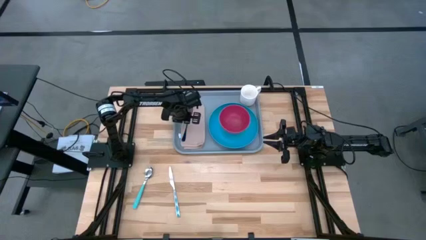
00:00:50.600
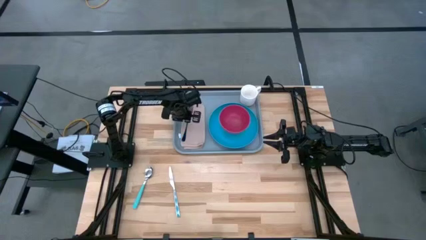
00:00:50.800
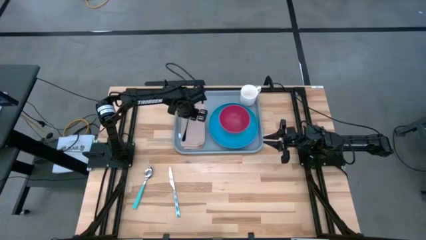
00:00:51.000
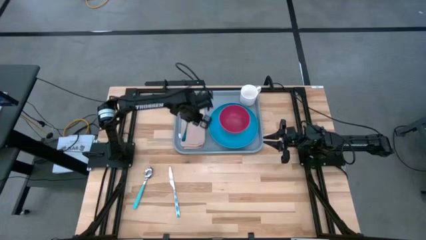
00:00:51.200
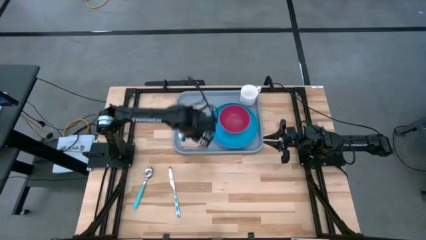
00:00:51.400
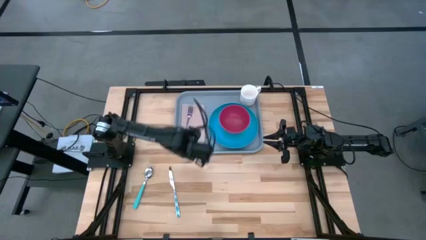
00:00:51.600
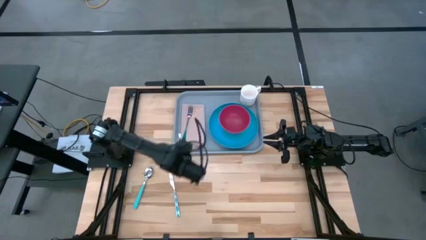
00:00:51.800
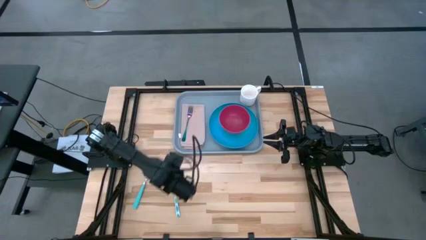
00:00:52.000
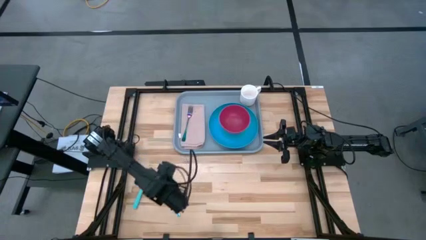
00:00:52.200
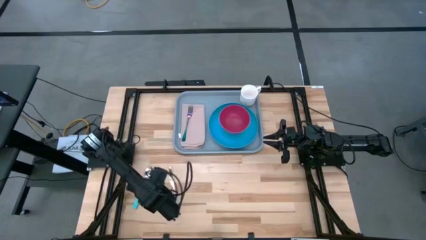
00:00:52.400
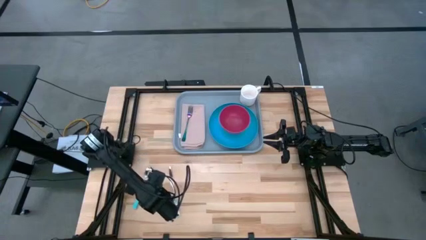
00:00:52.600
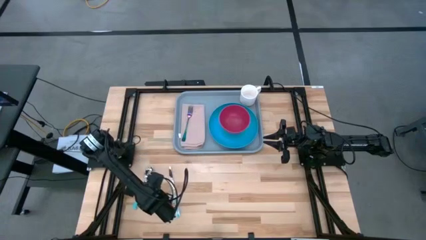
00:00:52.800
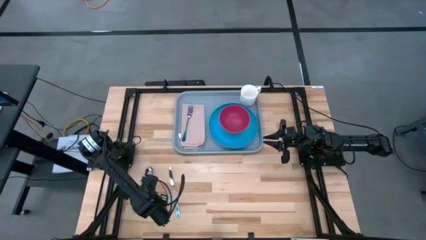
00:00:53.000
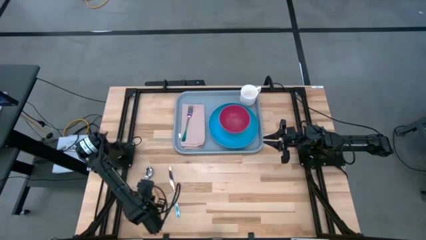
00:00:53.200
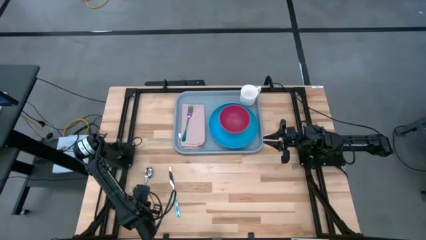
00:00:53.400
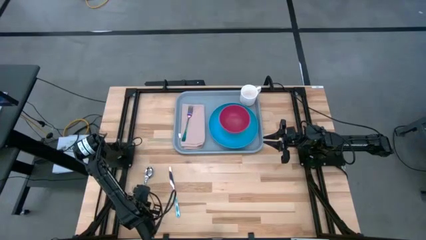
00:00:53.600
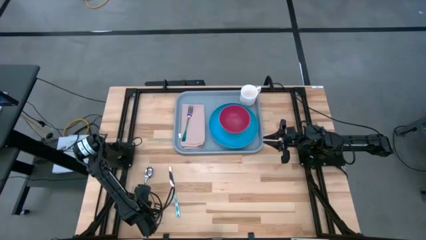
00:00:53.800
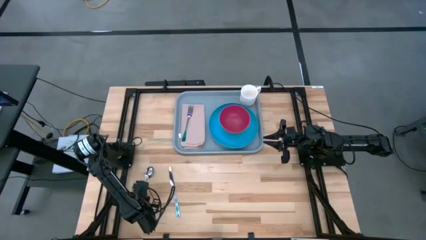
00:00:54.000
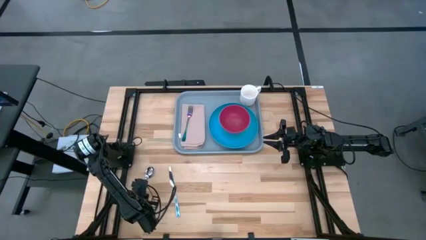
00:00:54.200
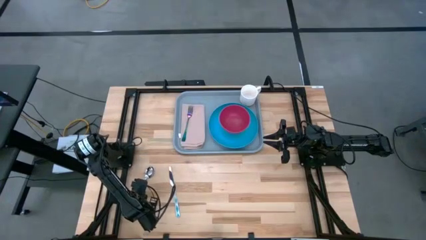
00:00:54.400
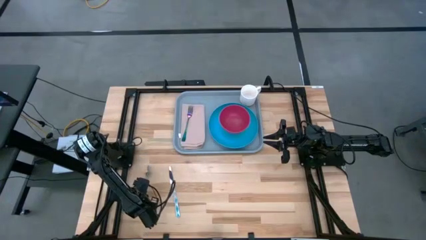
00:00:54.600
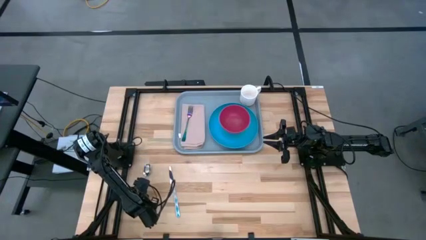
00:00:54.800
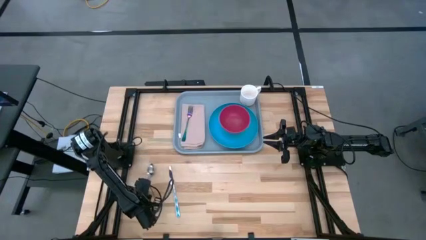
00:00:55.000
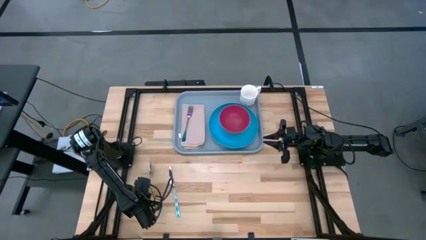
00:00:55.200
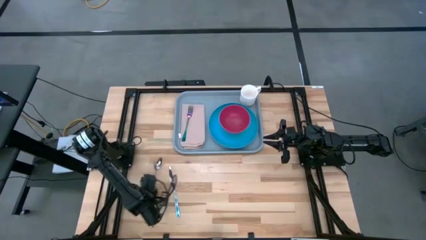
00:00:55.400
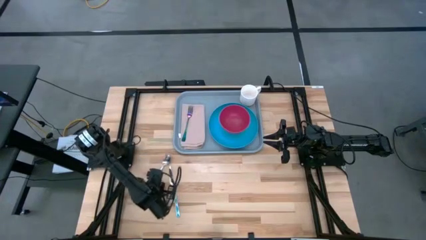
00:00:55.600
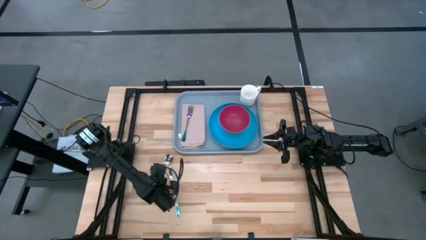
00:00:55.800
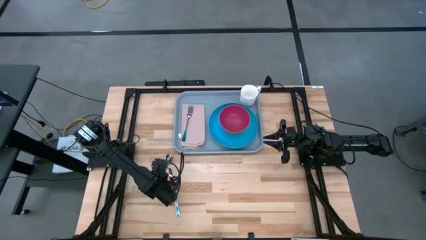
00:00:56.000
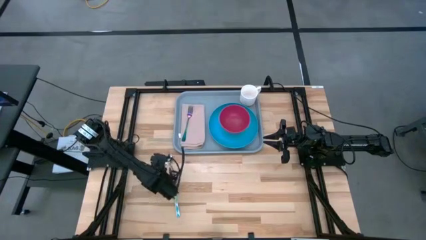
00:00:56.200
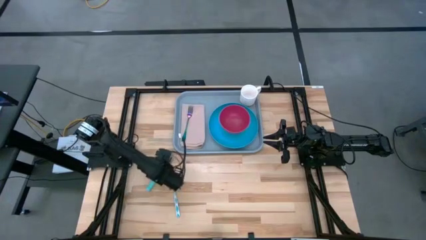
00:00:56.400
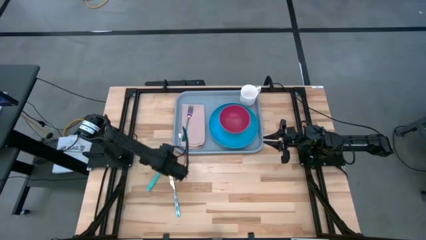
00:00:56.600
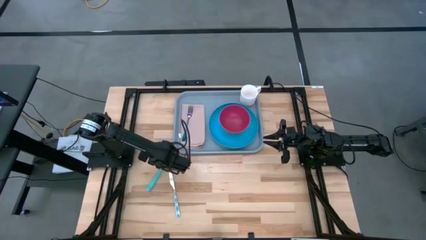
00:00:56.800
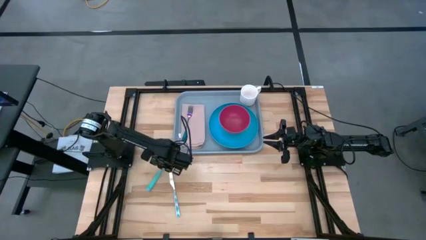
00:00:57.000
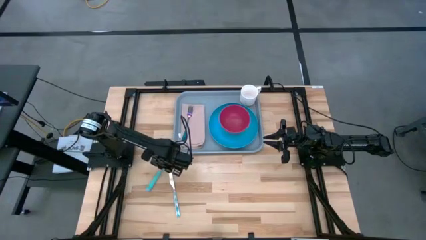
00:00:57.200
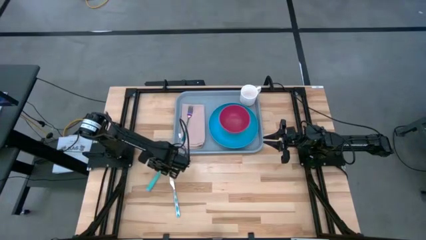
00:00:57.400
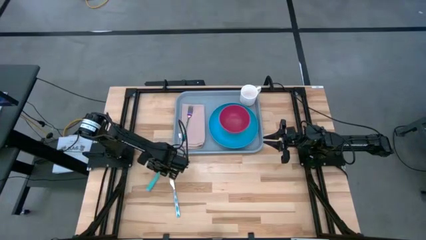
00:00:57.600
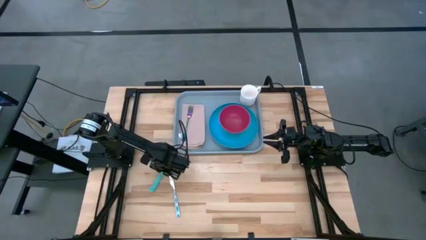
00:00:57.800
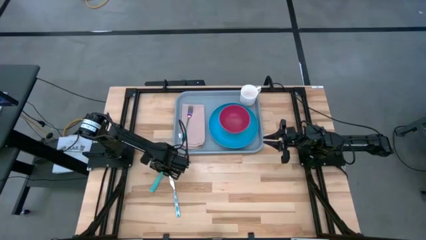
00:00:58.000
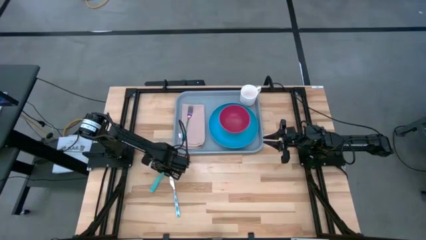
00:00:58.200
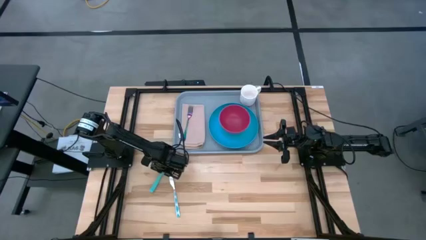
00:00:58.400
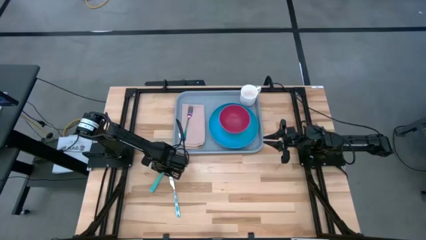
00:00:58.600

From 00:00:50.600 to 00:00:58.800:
Task: Set up tray
Put the spoon on the napkin to the right of the fork

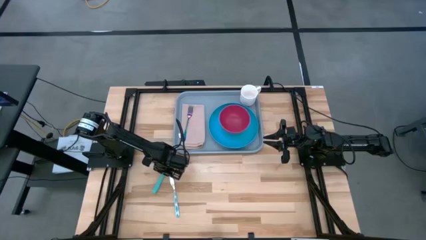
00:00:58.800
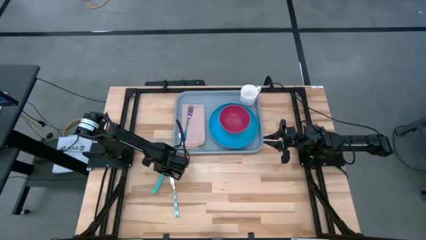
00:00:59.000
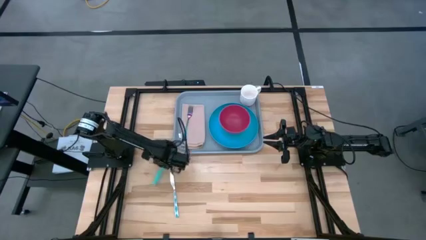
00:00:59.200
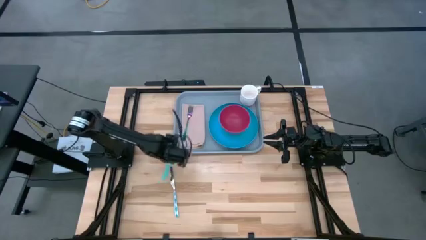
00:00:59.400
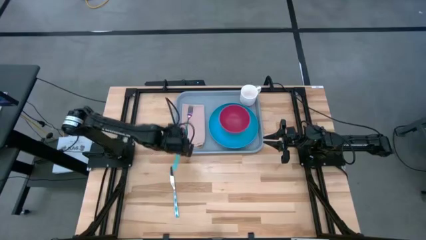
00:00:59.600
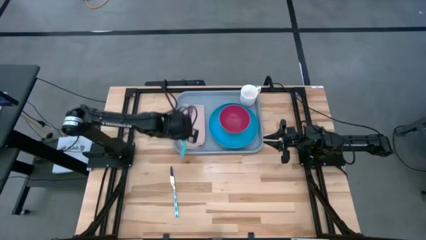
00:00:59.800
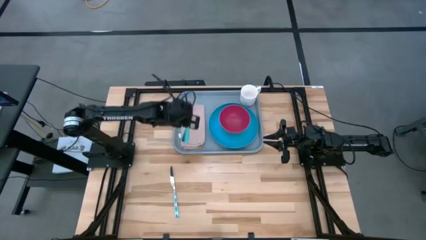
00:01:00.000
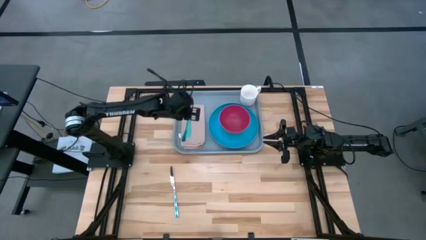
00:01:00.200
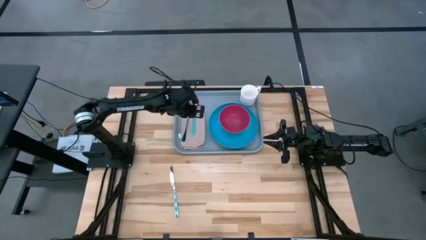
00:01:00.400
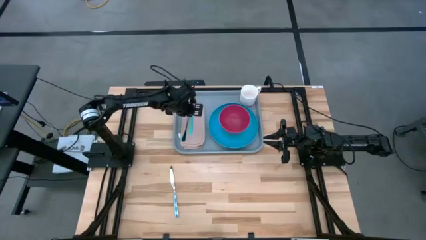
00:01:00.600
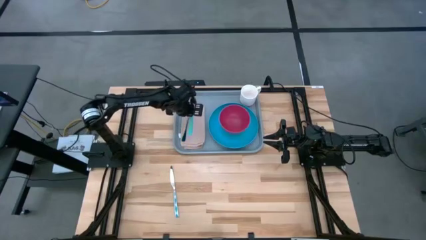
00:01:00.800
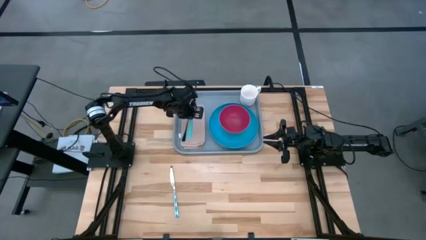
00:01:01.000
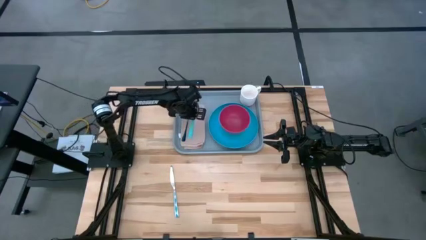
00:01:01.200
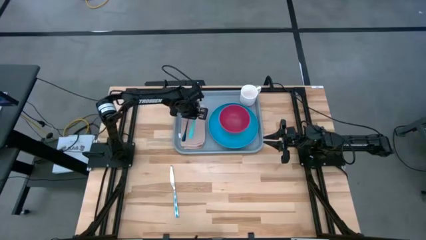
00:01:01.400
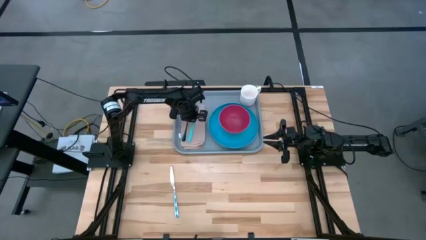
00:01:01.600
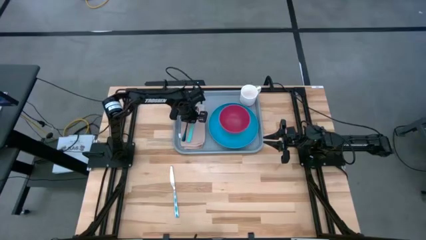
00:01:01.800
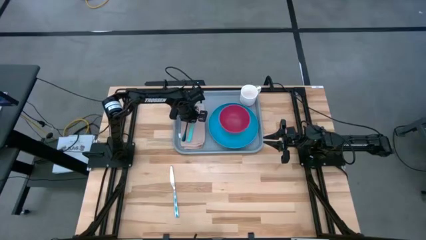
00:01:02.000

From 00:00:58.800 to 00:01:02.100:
Put the spoon on the napkin to the right of the fork

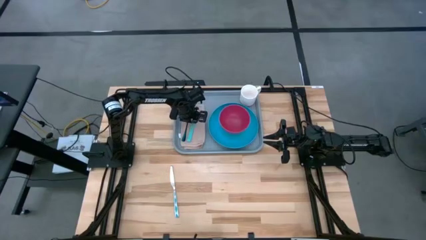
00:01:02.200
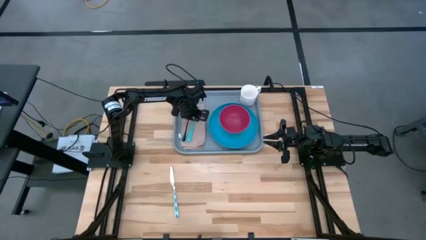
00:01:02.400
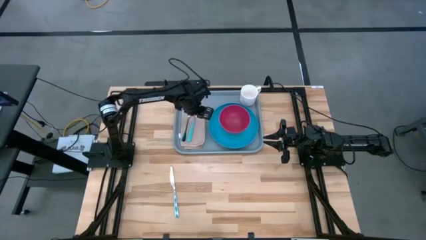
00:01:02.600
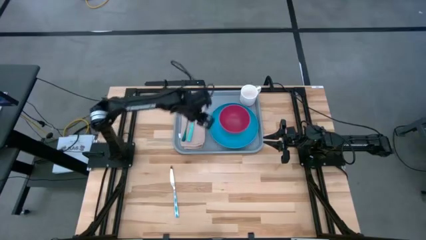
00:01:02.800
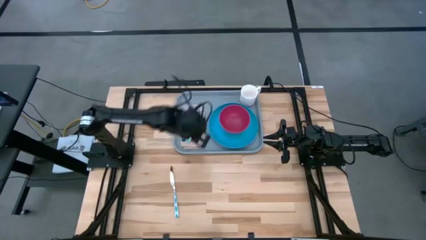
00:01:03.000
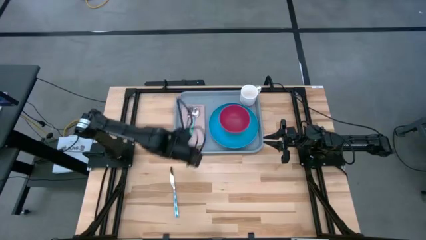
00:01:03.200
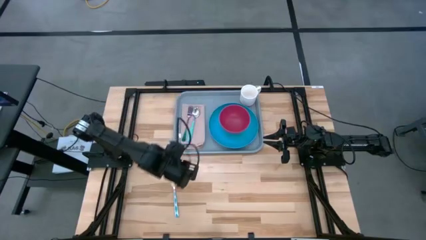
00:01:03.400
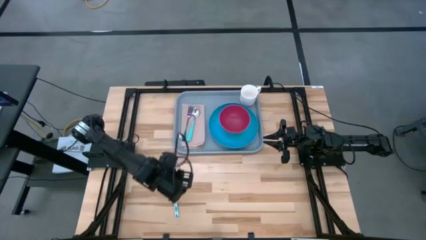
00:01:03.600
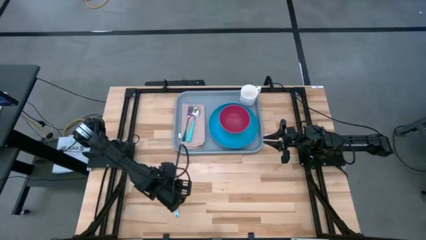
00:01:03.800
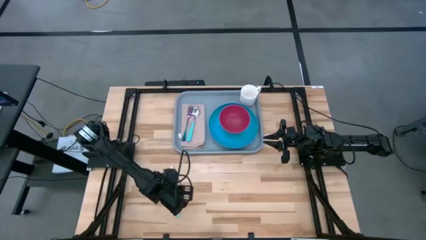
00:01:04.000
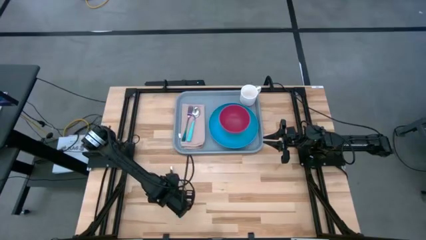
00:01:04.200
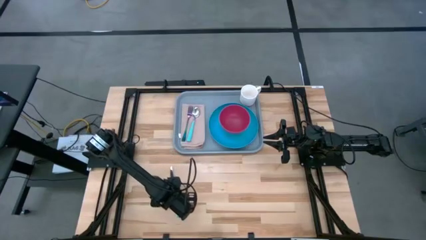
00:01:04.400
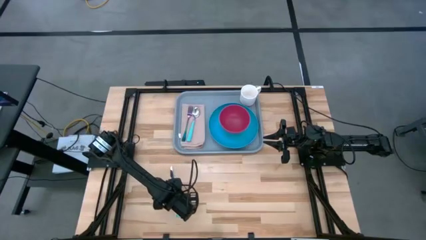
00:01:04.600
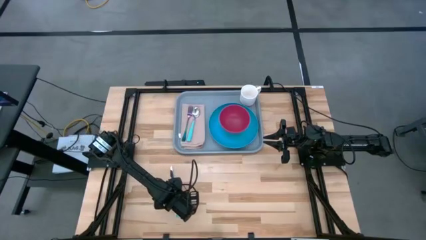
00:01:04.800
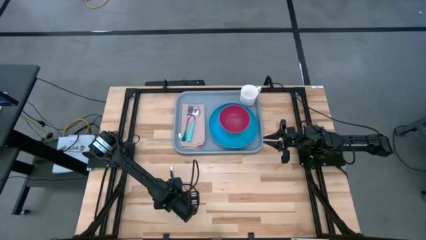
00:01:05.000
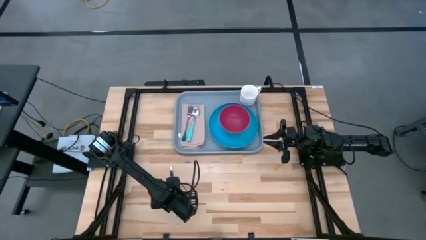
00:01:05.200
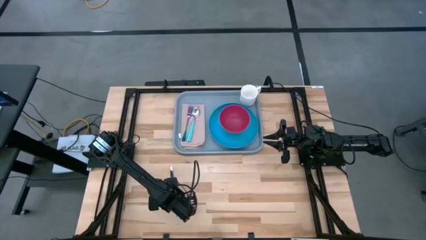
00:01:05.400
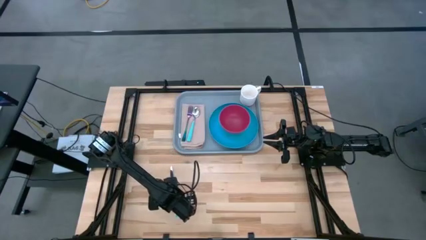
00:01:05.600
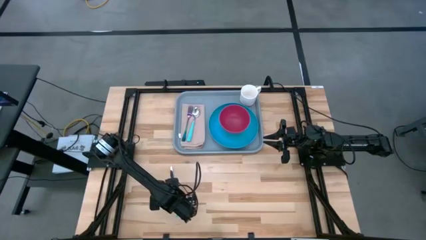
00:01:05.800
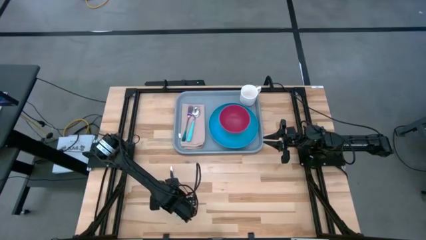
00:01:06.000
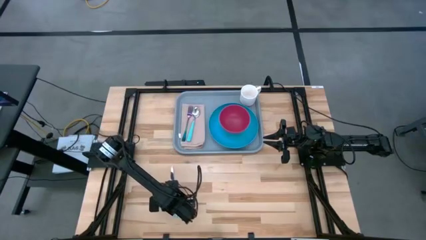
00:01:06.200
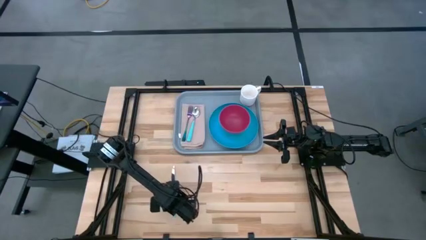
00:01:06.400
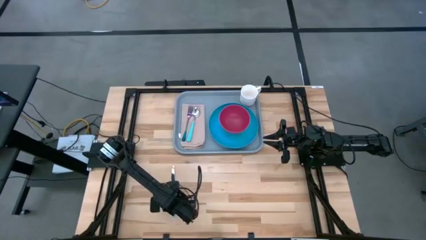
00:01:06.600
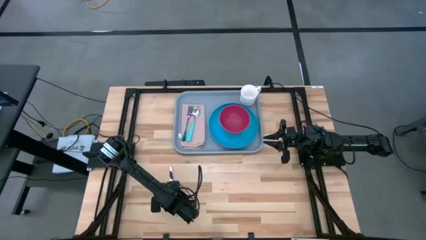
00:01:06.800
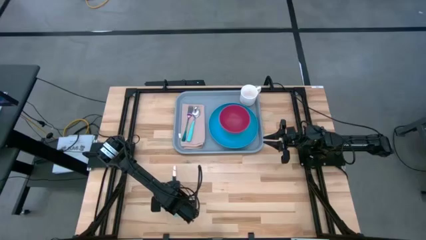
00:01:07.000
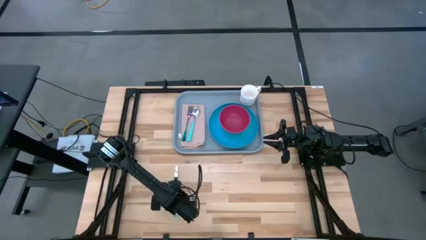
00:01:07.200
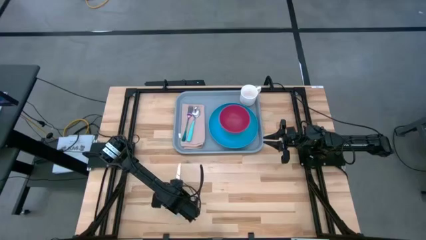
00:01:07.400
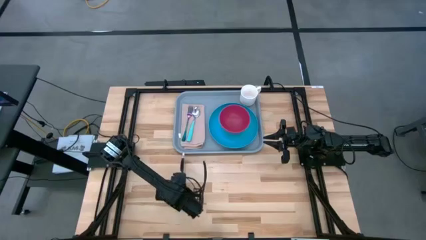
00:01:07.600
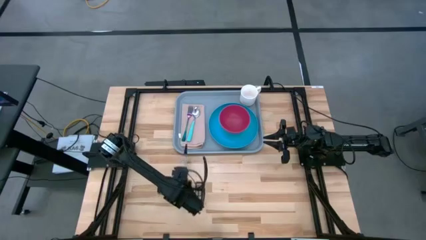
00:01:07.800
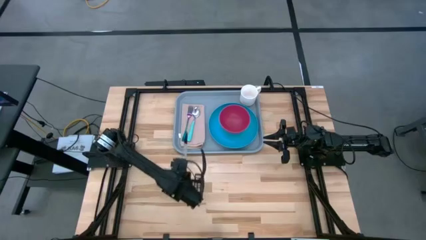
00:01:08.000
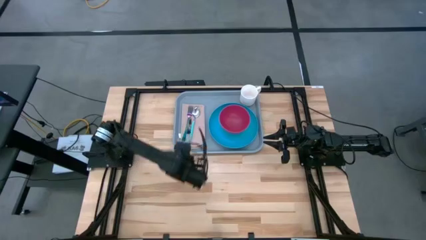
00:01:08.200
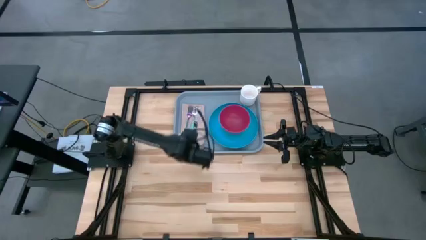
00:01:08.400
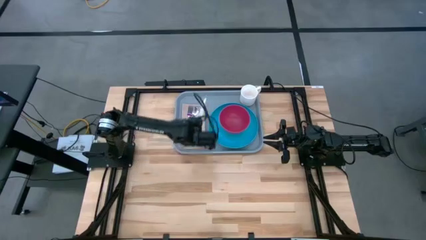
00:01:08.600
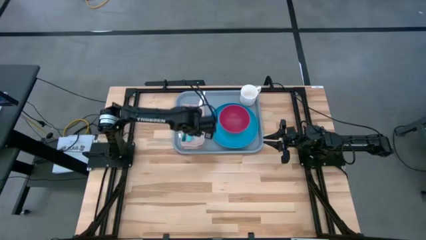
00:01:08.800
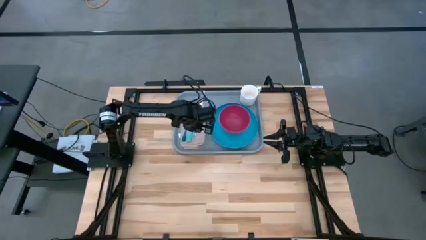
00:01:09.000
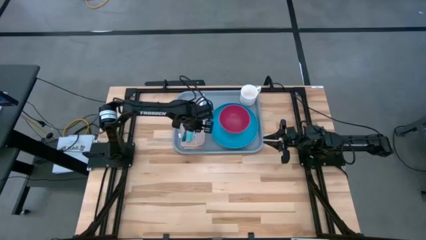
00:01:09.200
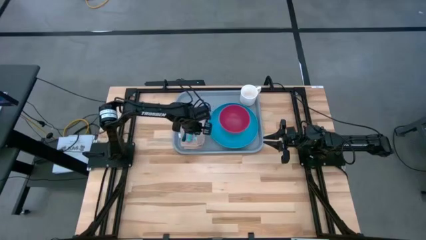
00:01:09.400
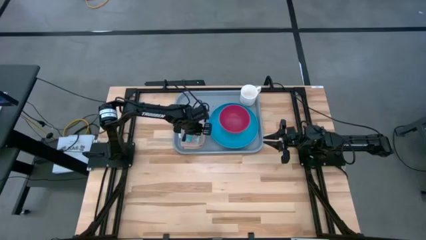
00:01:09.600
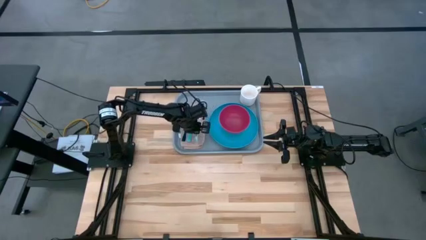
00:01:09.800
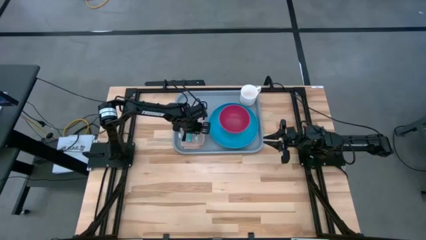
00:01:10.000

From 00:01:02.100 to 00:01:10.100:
Put the knife on the napkin to the right of the spoon
